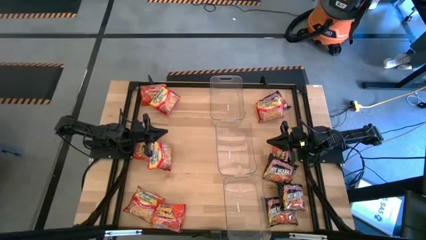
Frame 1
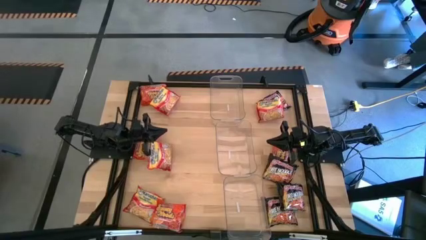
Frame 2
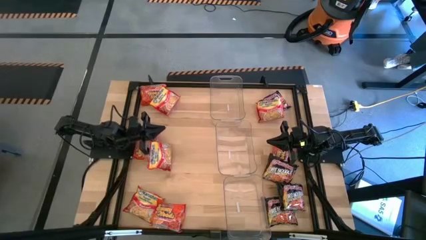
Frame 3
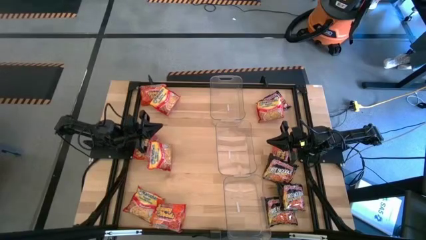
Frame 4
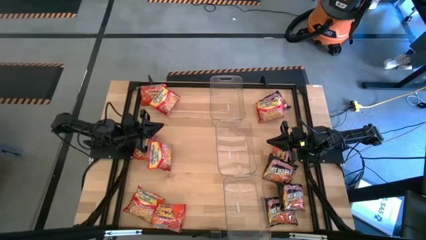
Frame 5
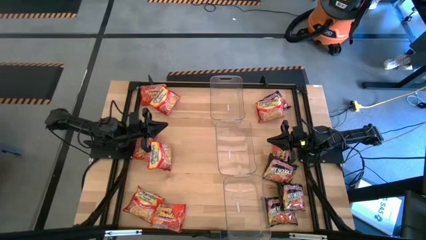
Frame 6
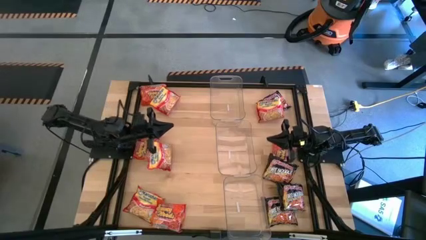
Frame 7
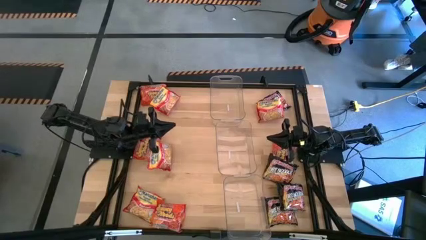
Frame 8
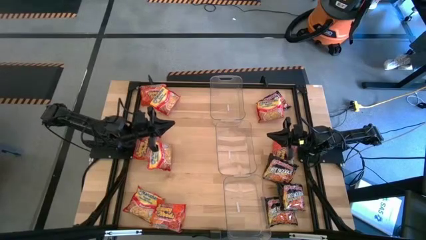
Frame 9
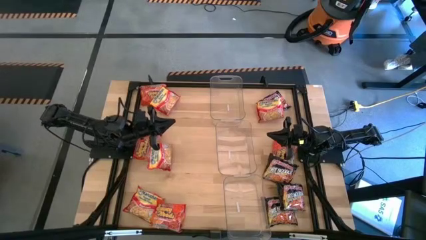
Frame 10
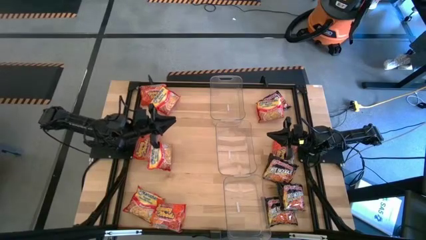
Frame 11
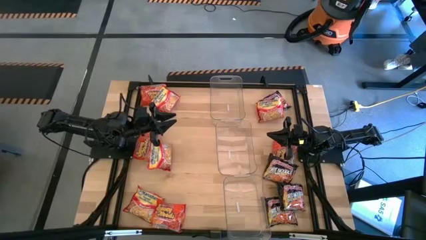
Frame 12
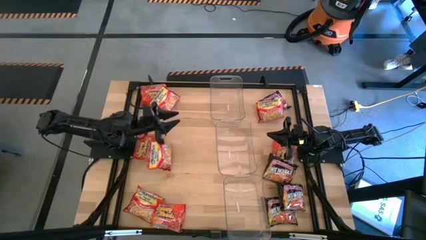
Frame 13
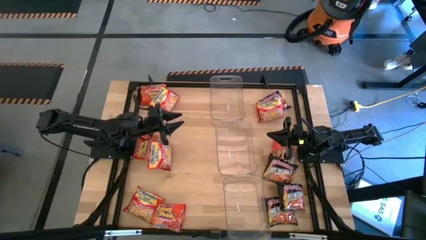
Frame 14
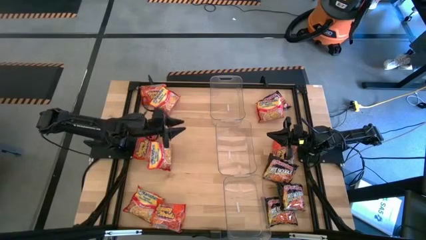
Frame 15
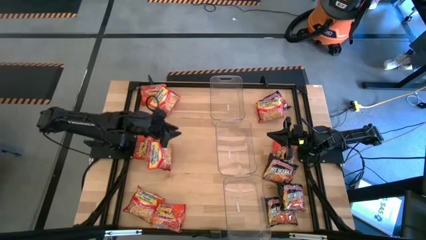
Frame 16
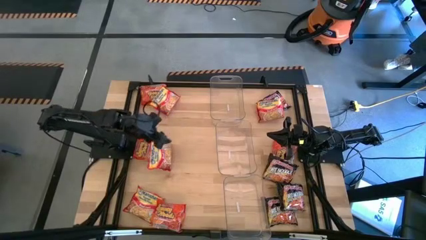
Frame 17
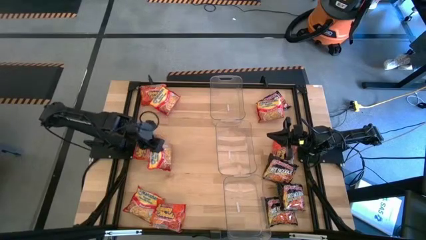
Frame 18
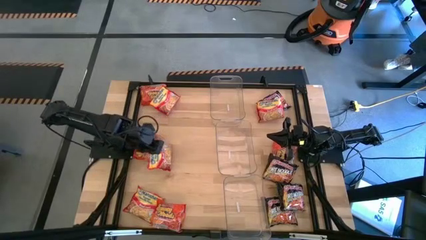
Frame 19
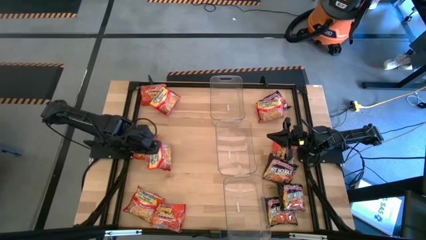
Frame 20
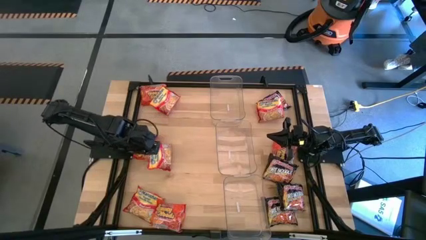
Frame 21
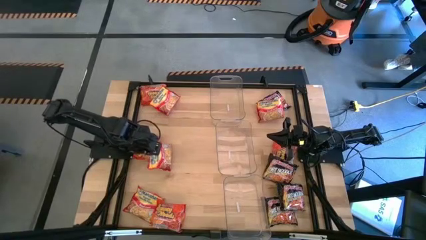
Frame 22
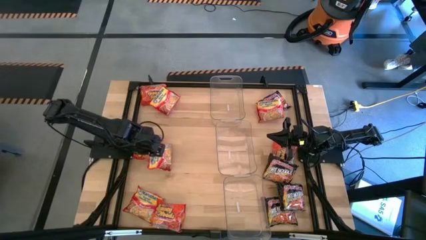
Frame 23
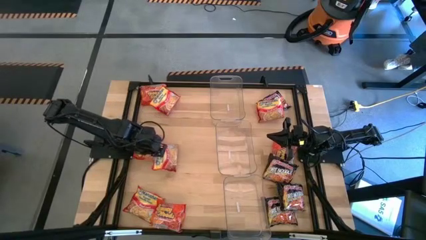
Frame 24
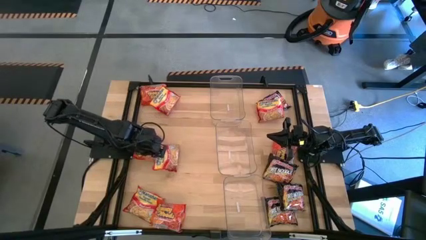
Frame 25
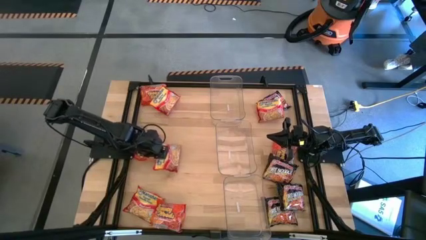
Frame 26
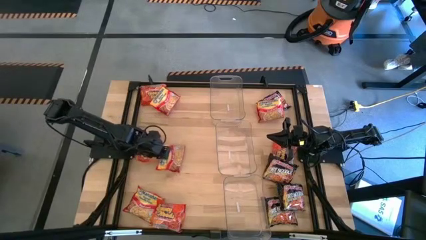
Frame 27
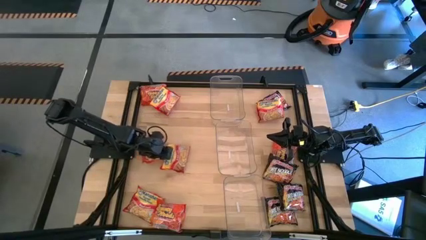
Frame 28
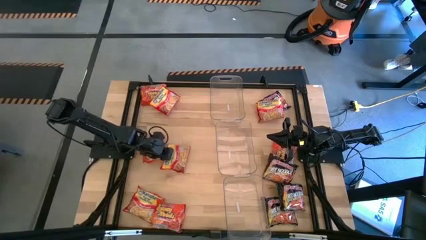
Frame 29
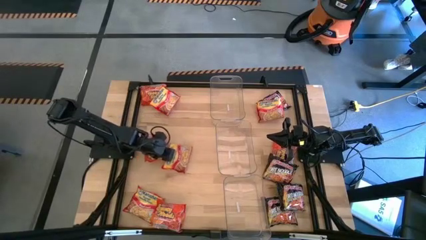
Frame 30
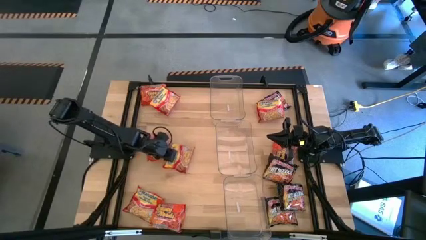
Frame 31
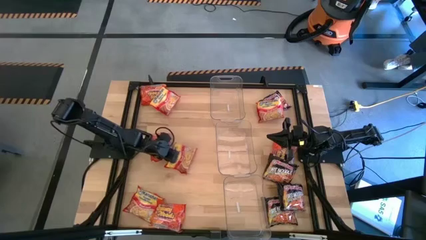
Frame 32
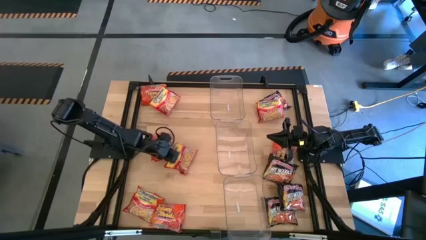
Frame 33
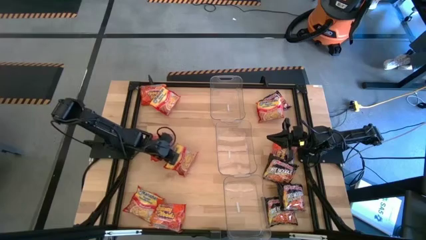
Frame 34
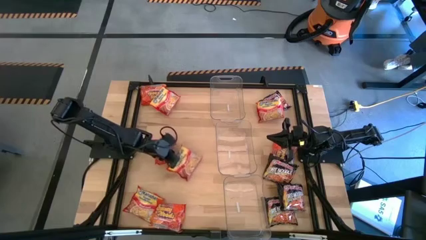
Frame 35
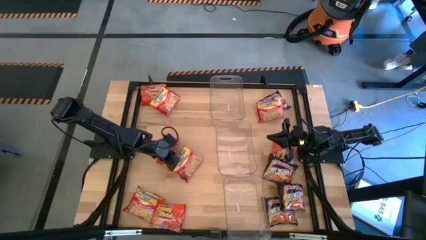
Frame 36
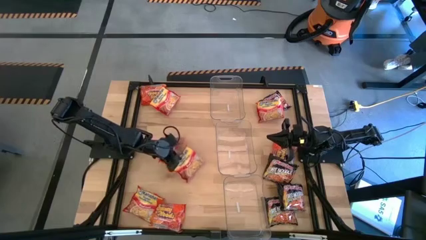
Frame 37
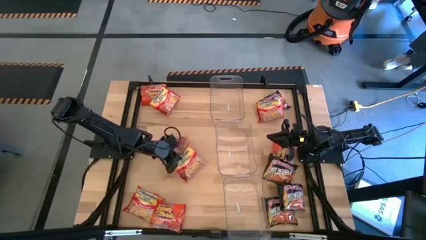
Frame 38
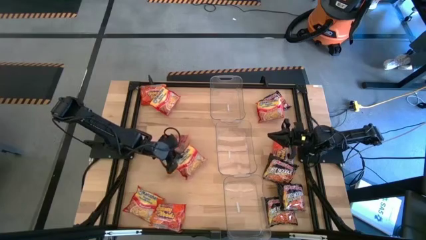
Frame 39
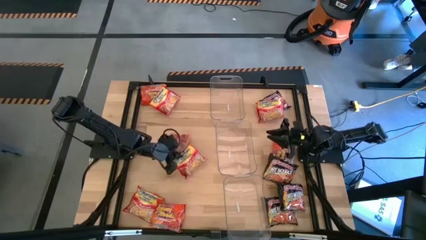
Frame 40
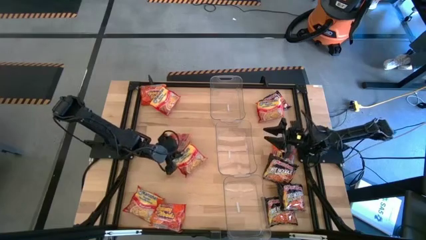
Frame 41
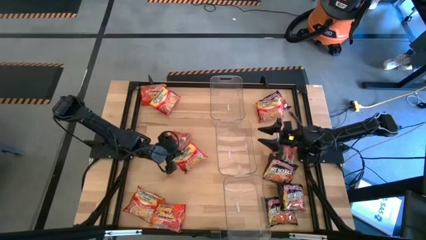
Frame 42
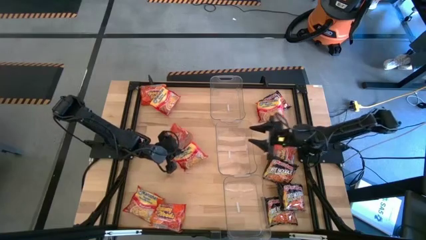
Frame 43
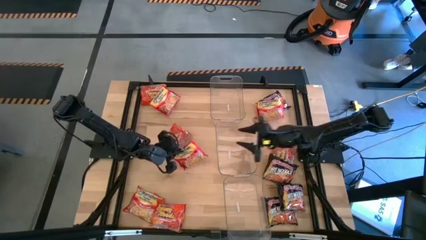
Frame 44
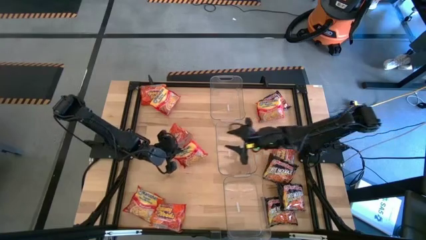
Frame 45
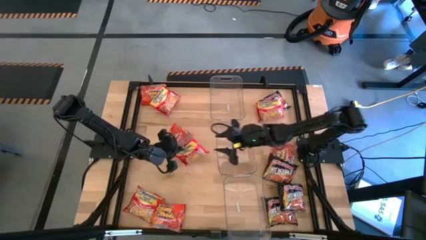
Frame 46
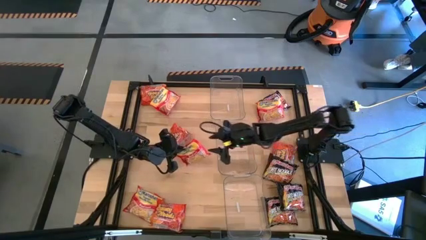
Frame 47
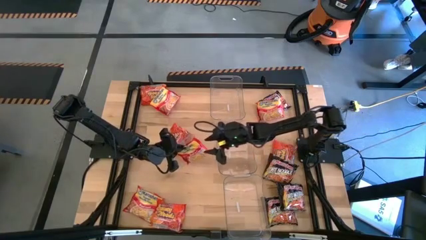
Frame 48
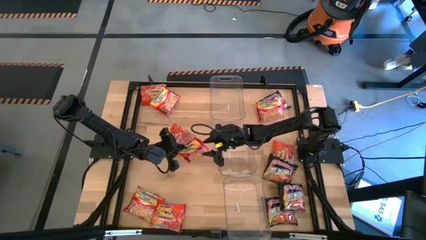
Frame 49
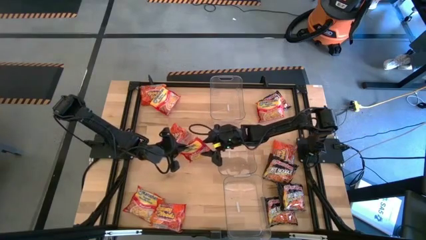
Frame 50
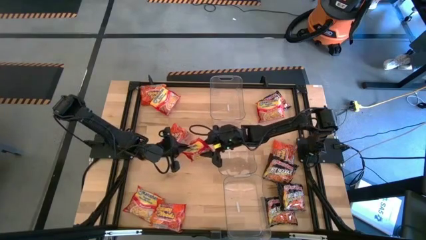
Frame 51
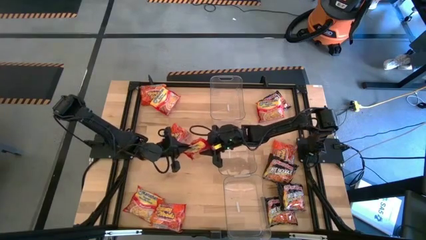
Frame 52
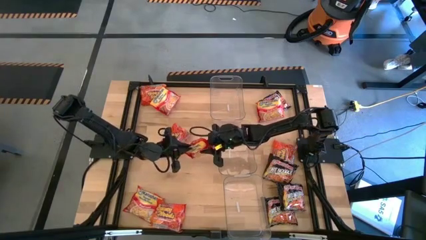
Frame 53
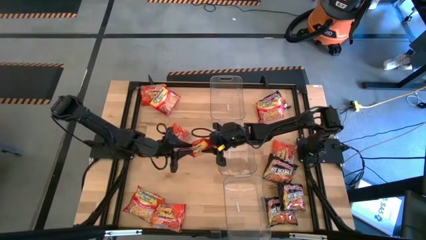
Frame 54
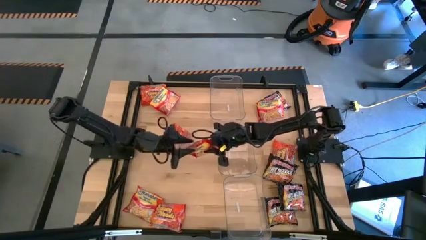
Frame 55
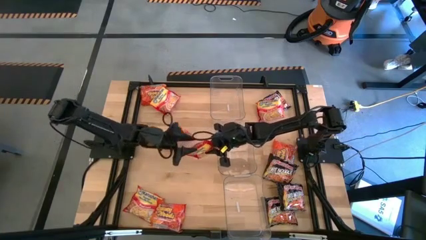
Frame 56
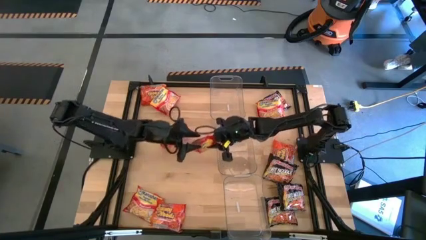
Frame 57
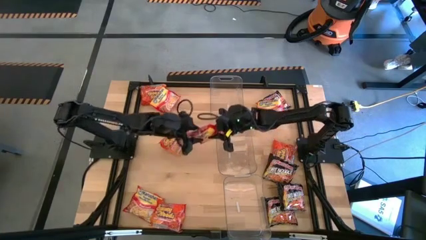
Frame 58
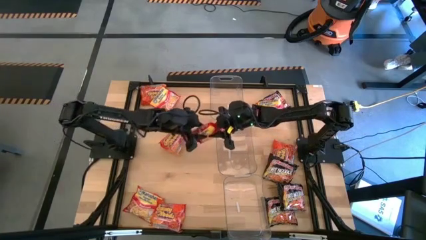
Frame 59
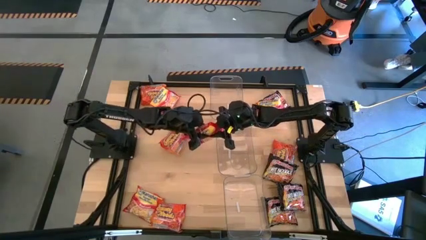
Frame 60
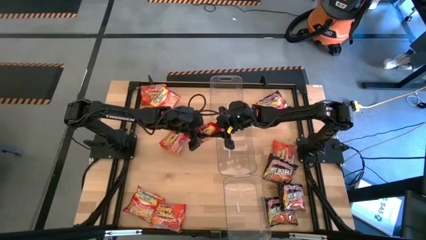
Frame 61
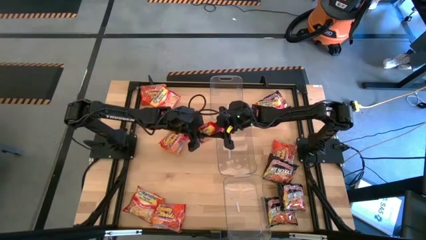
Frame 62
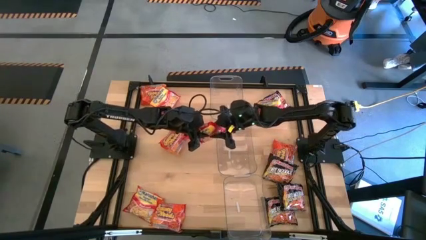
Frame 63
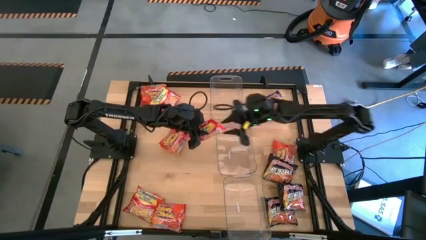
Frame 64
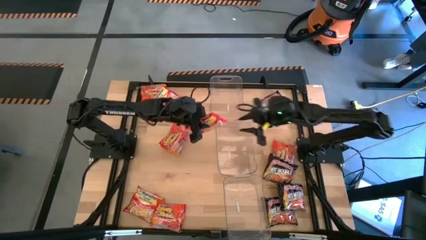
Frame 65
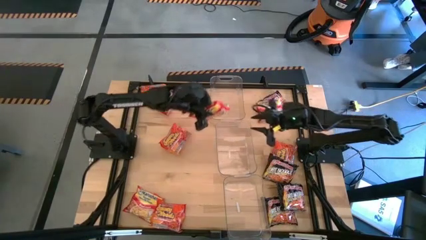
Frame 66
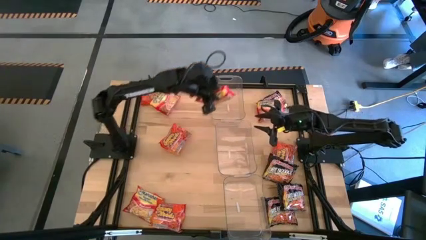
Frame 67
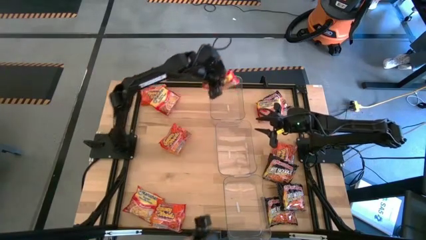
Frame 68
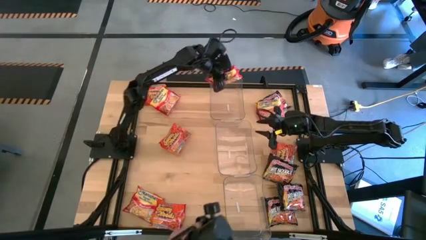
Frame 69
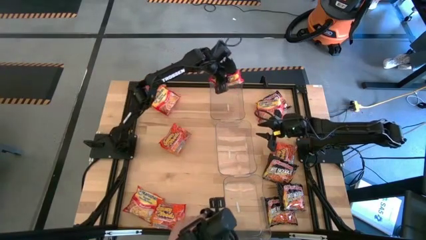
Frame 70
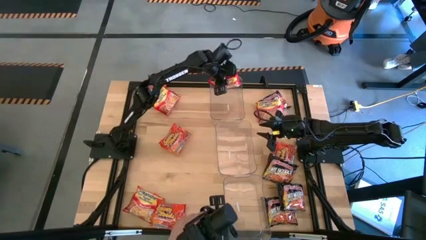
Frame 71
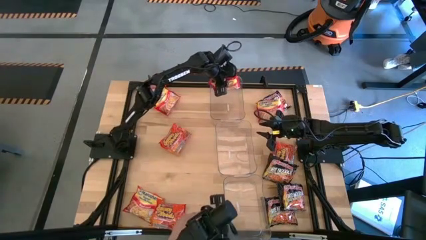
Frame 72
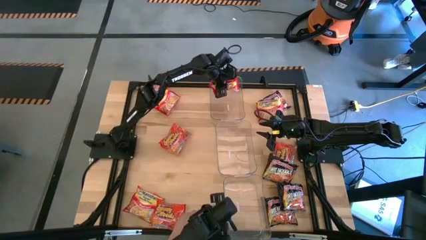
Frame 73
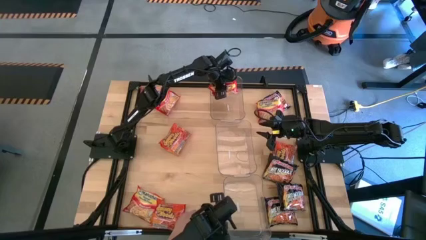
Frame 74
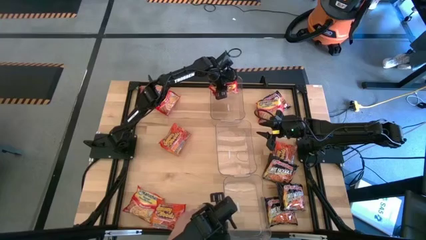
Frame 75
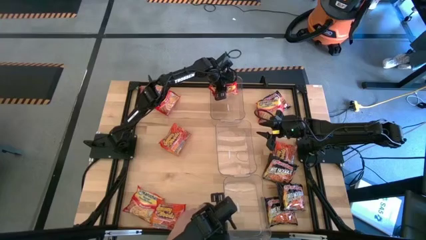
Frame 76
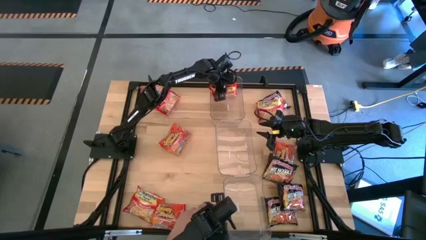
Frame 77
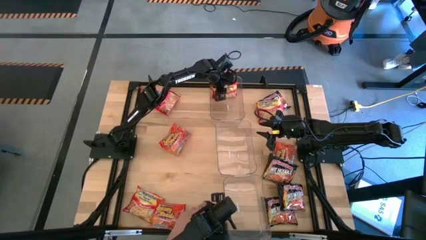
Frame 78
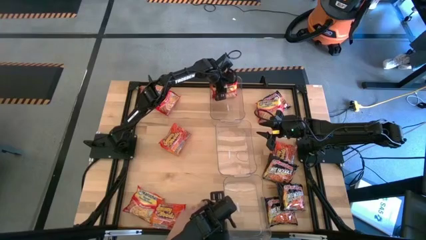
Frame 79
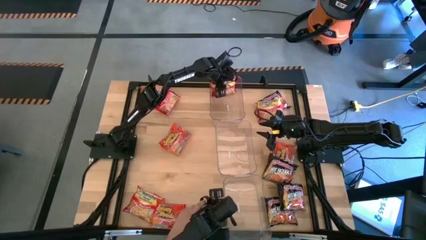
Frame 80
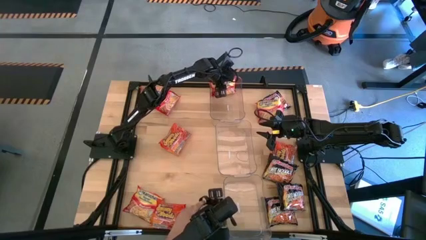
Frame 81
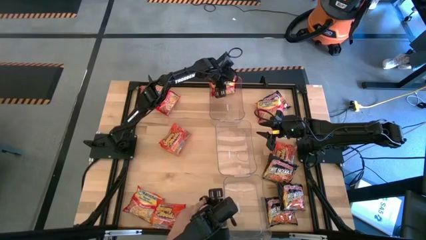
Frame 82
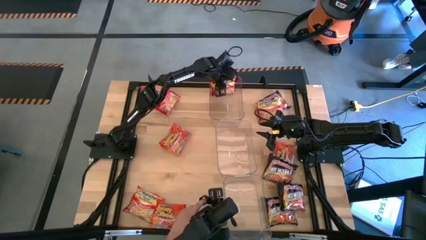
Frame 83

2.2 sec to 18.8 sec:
Task: Sort Maruchan noodles
Put the red noodle pack into the top transparent bin
